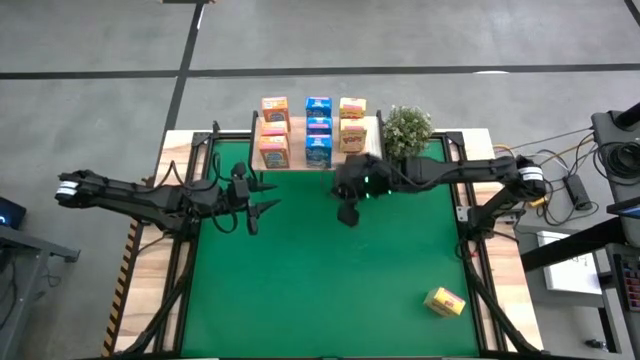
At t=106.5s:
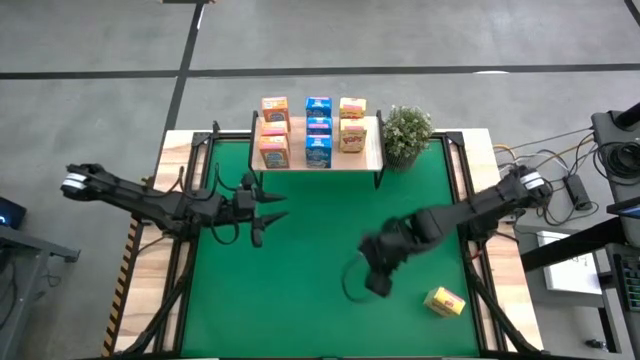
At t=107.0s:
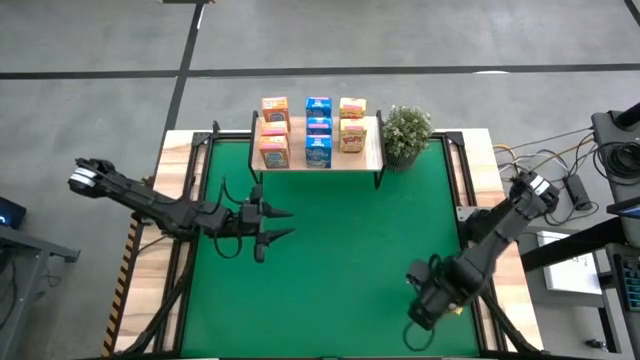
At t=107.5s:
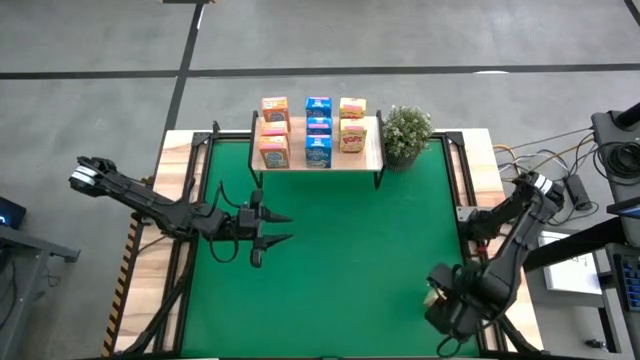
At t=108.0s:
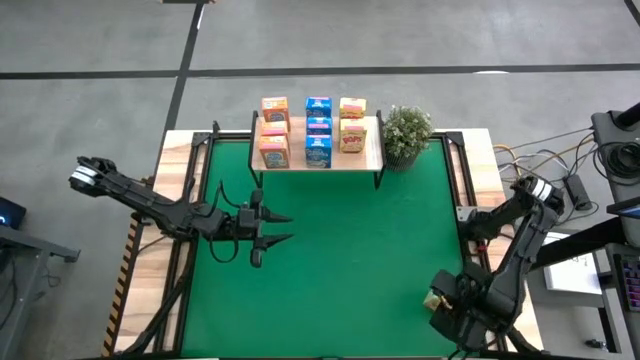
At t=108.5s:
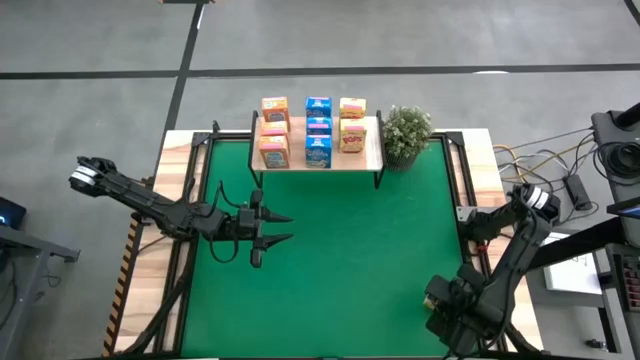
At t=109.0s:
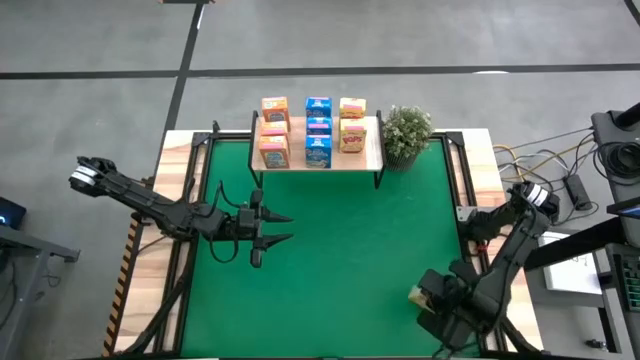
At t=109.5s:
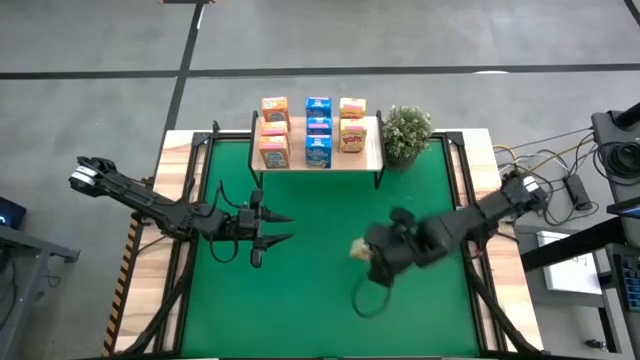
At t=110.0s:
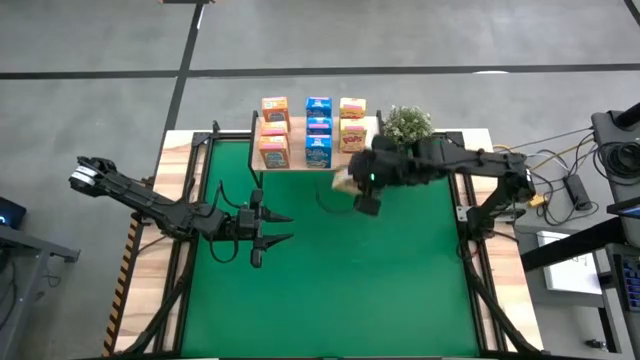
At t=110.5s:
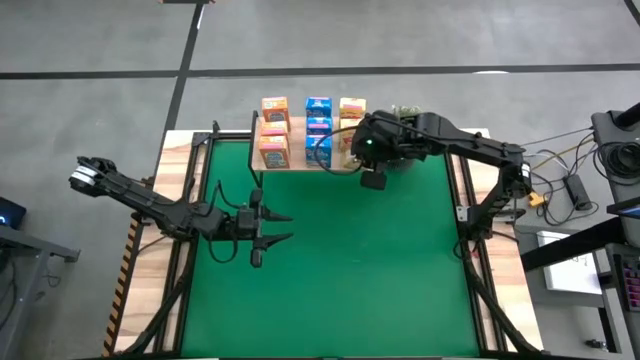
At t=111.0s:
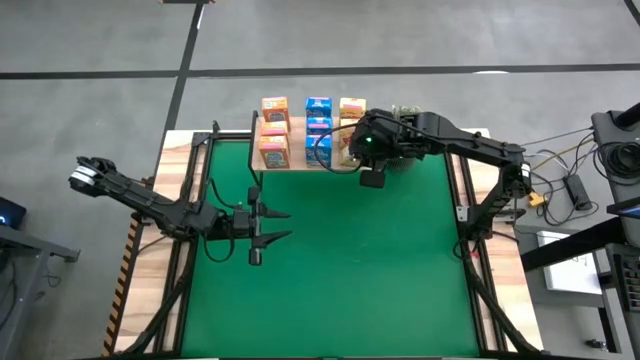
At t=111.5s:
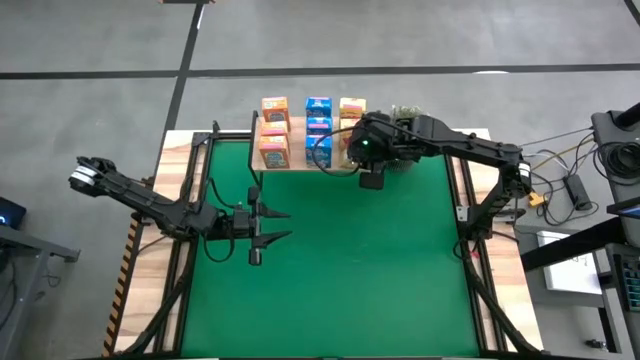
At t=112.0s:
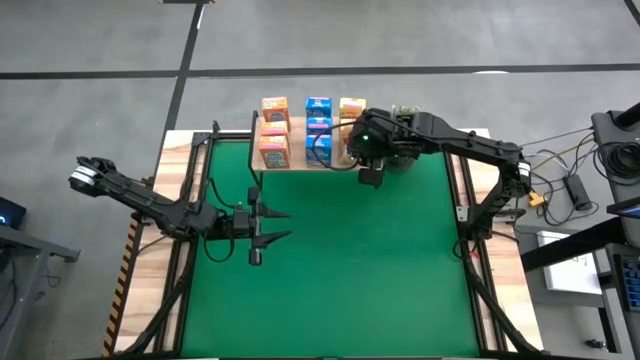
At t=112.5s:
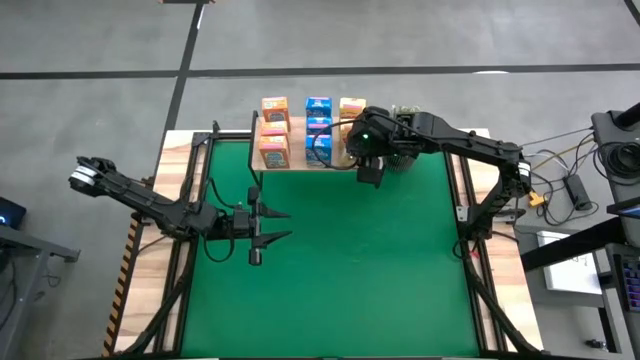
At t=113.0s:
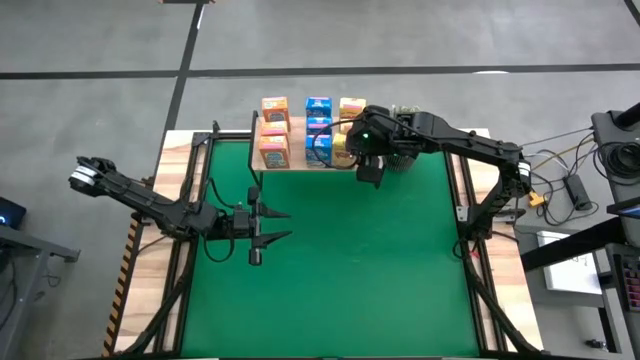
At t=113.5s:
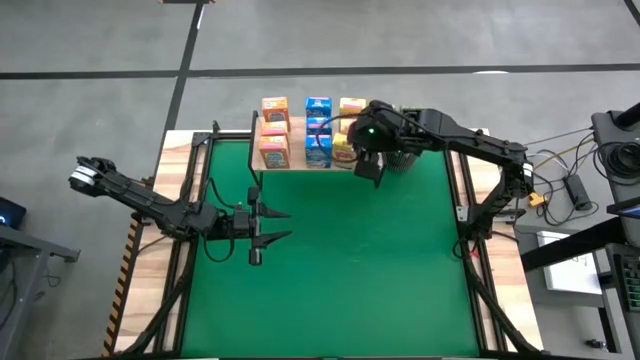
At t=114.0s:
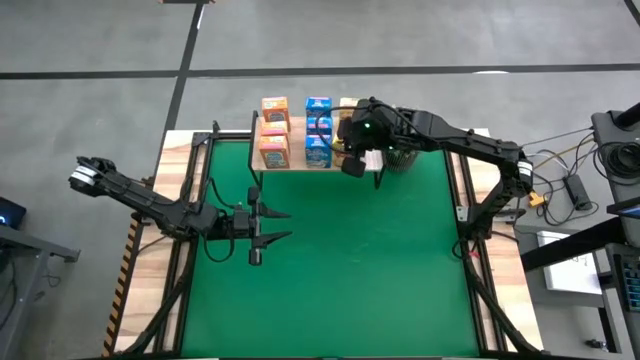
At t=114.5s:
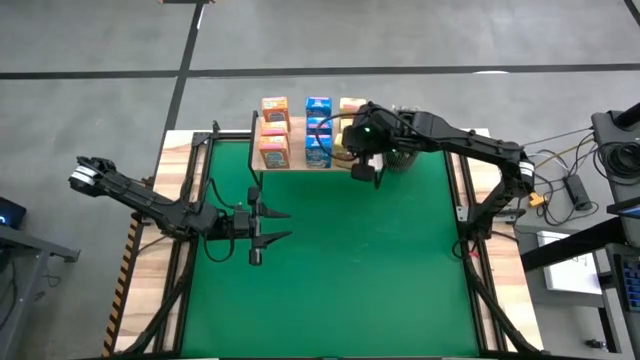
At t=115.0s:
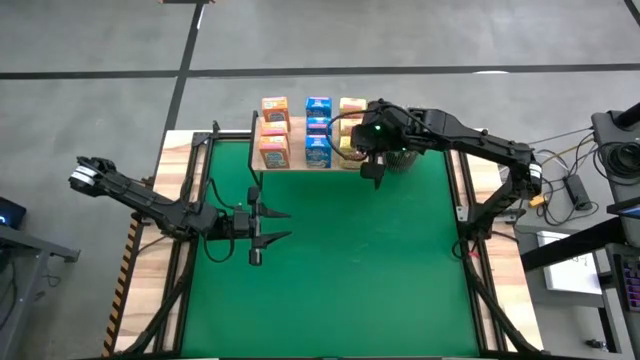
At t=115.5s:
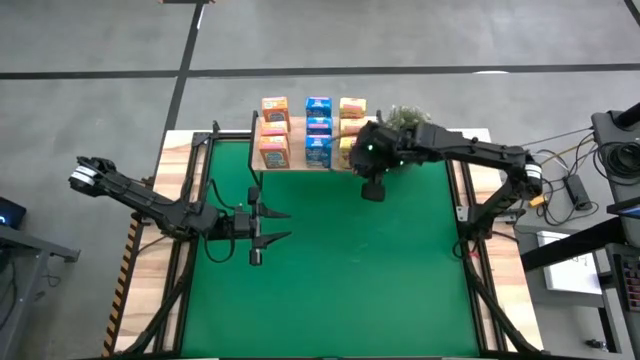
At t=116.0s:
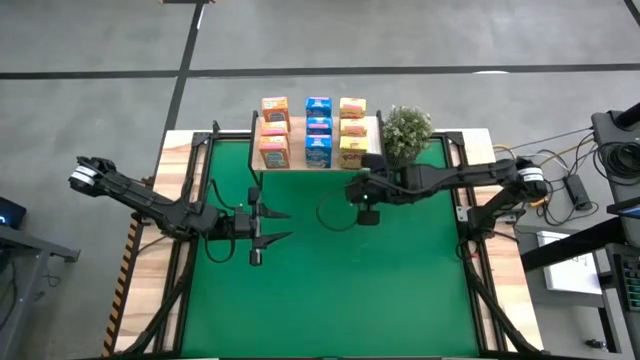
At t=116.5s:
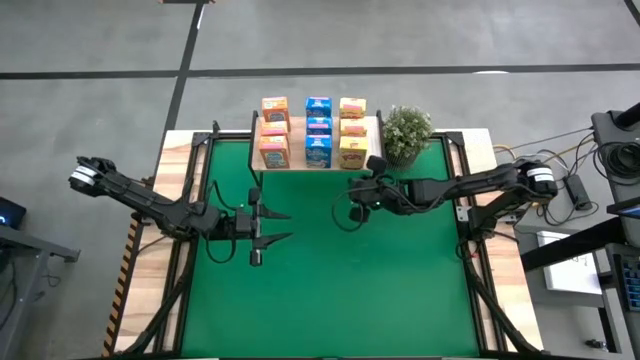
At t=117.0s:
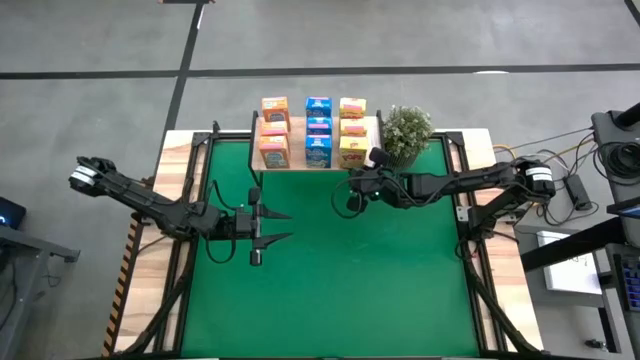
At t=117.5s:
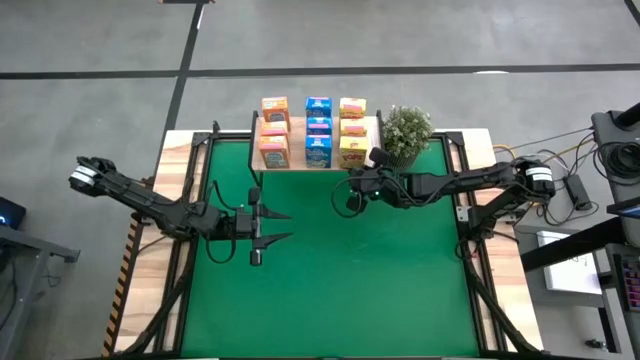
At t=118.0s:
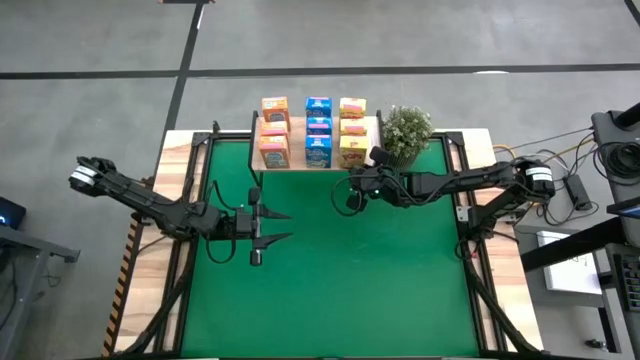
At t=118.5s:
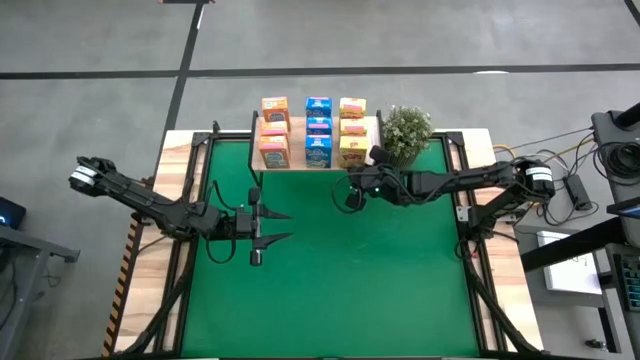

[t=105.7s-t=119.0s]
Task: Stack cereal on shelf
Put the yellow cereal box on the shelf

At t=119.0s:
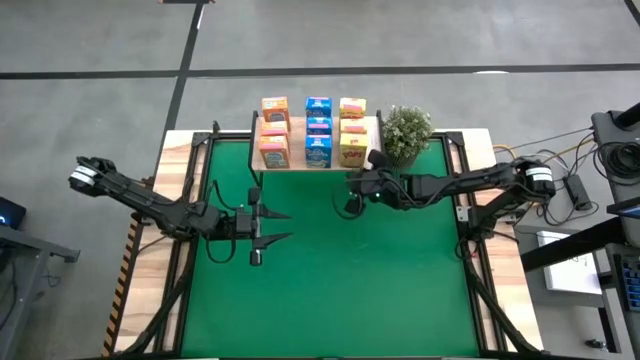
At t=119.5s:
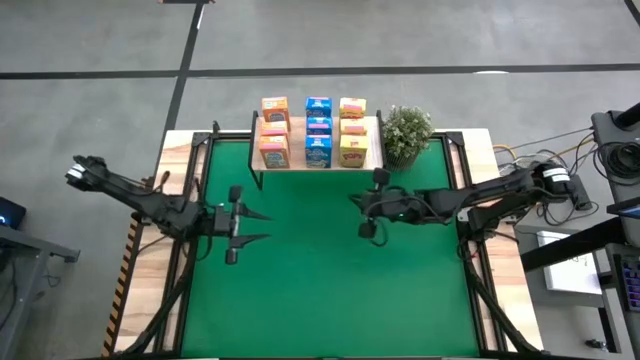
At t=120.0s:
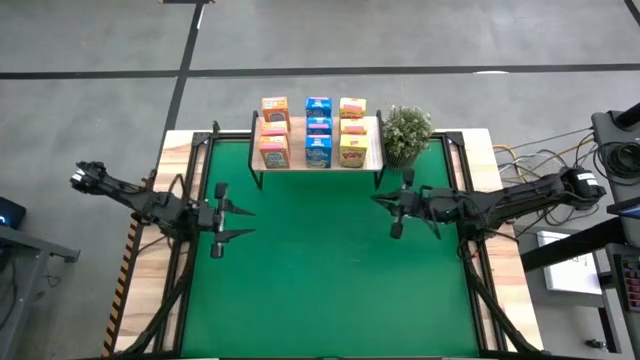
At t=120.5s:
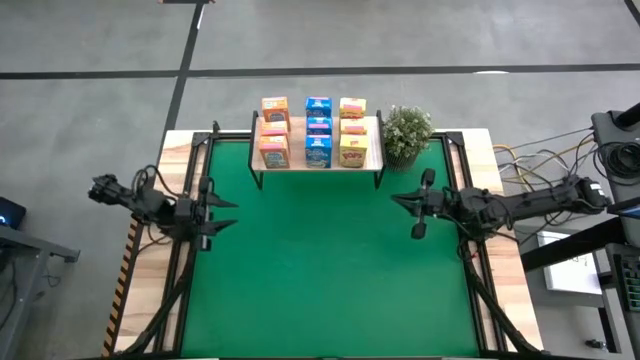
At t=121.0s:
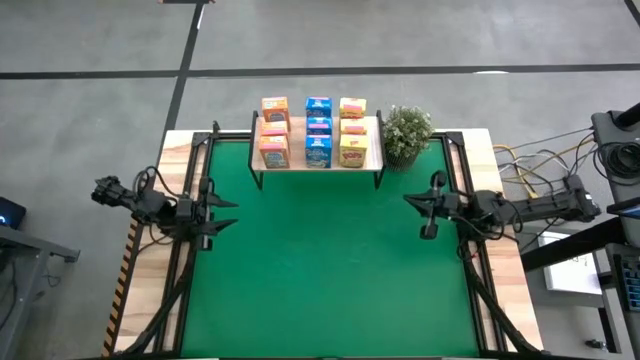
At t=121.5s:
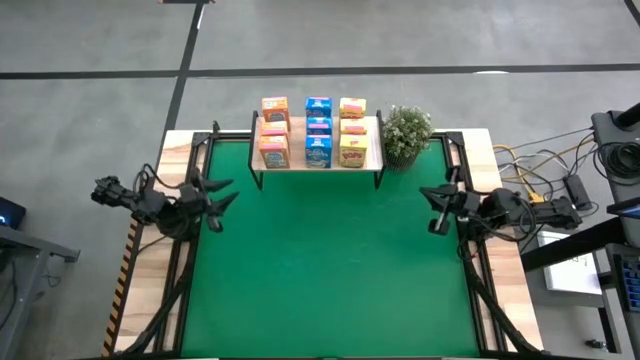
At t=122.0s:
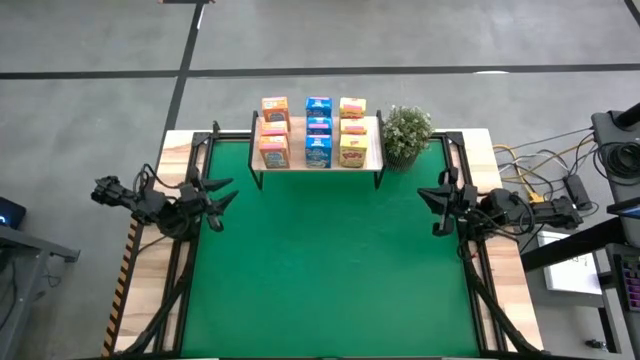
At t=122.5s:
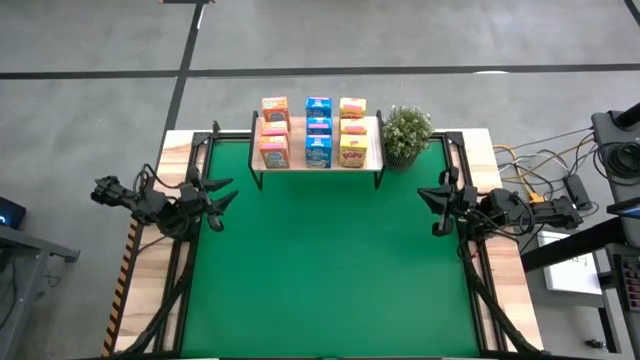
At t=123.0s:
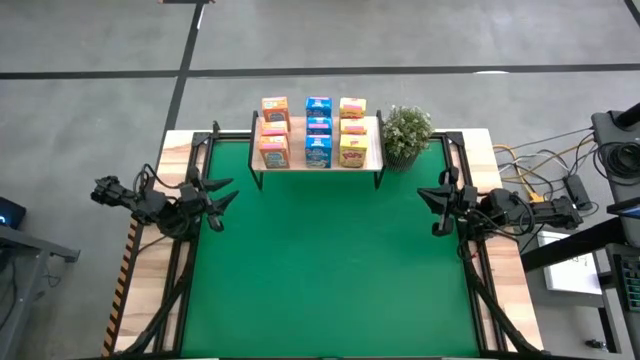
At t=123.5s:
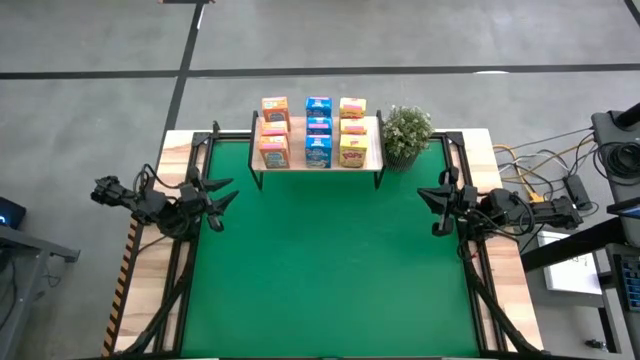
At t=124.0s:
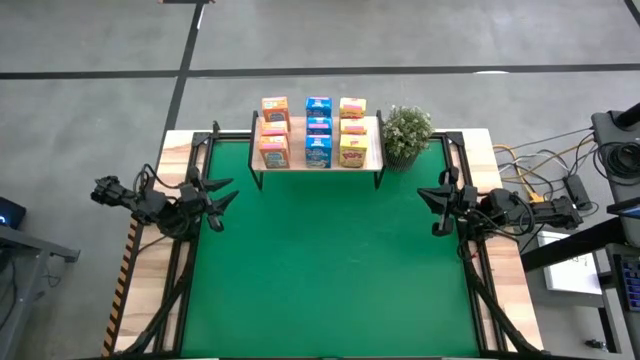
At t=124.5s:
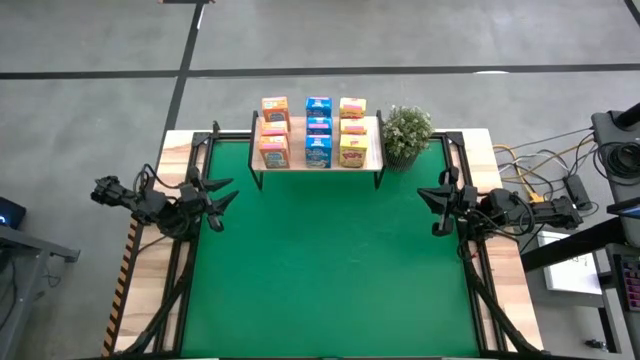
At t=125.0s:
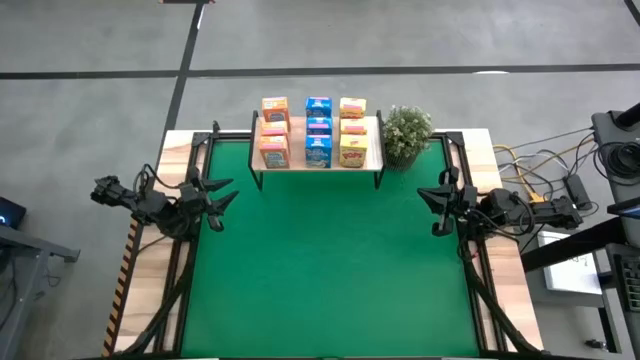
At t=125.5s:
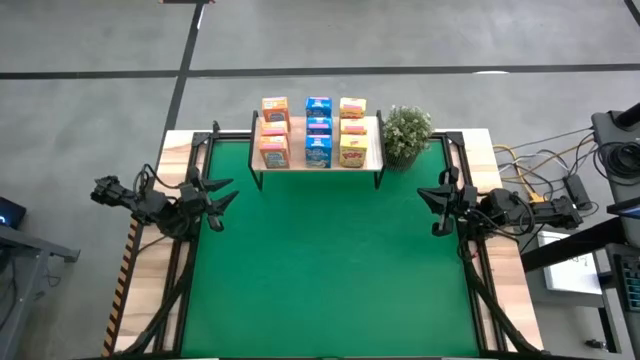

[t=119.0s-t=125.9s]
Return to Home Position

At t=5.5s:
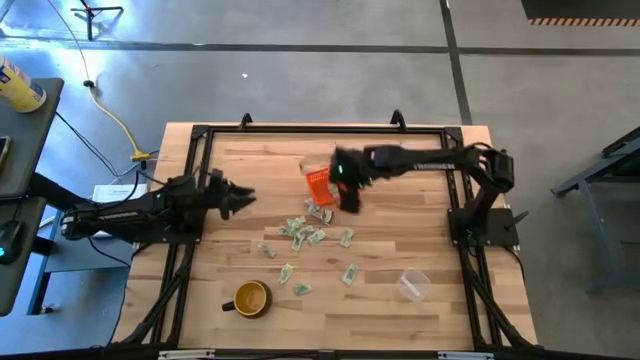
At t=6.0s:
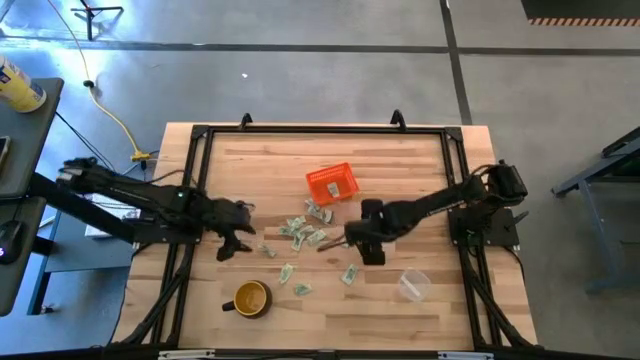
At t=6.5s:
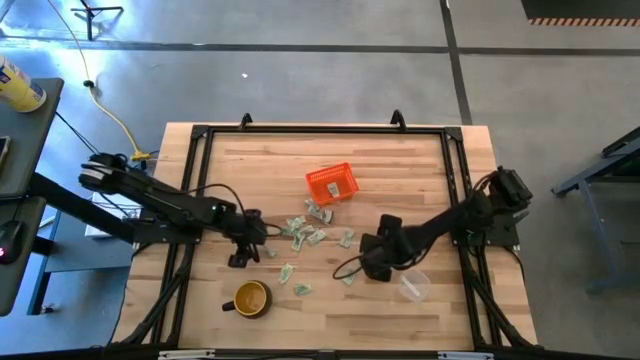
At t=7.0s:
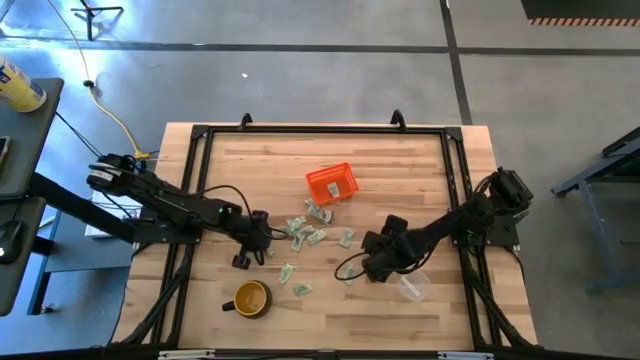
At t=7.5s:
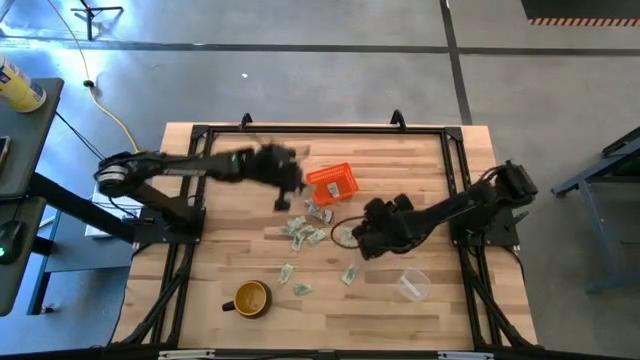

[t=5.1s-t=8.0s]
Task: Pick and place items into bin
Put the white stevia packet into the orange bin
